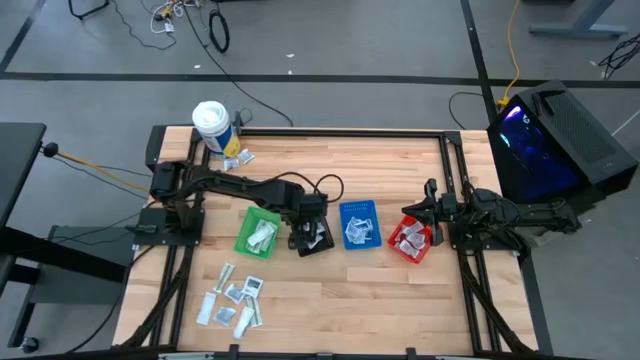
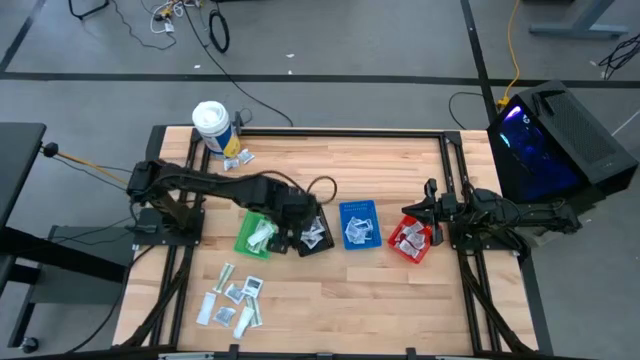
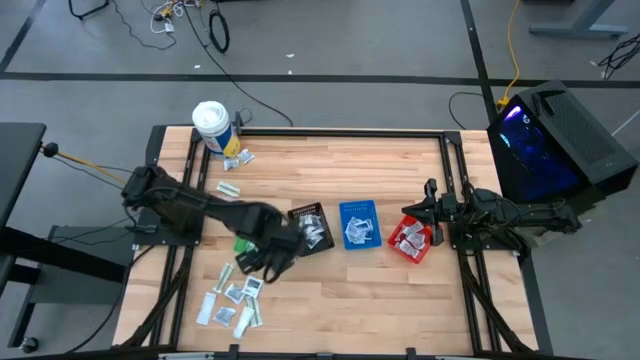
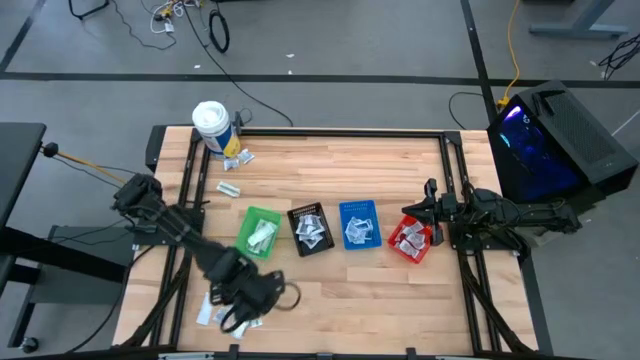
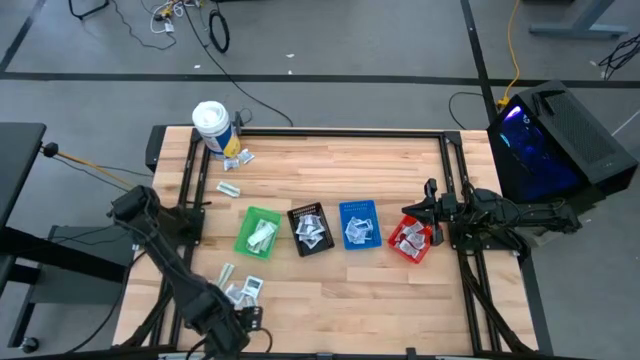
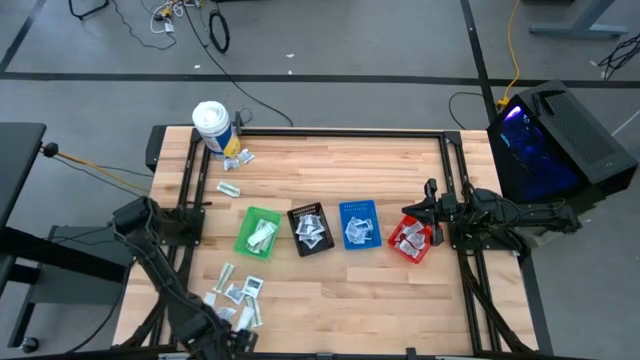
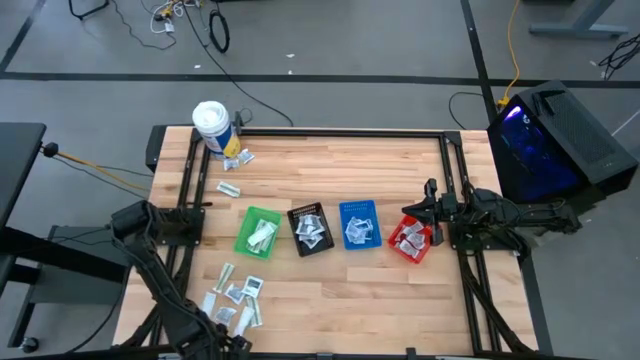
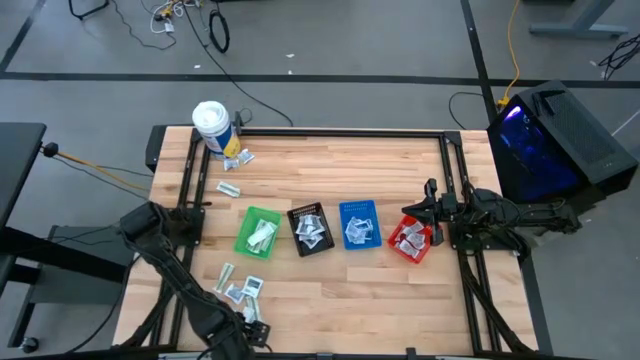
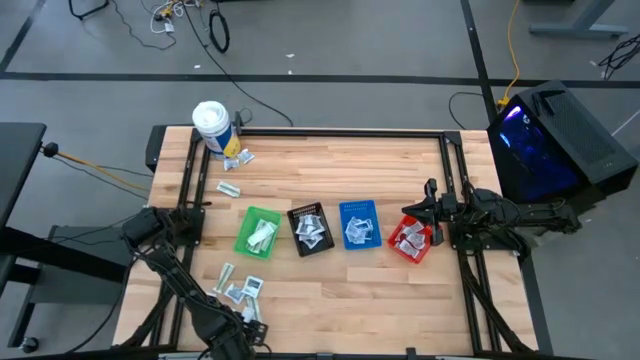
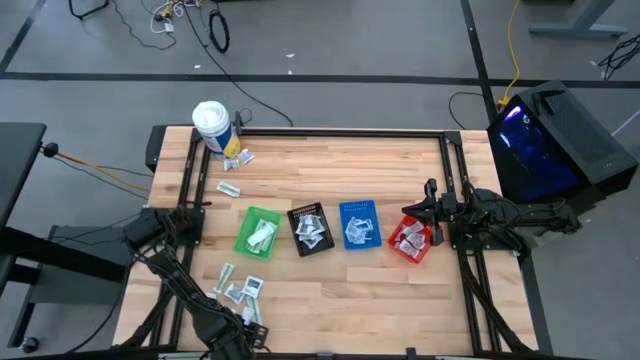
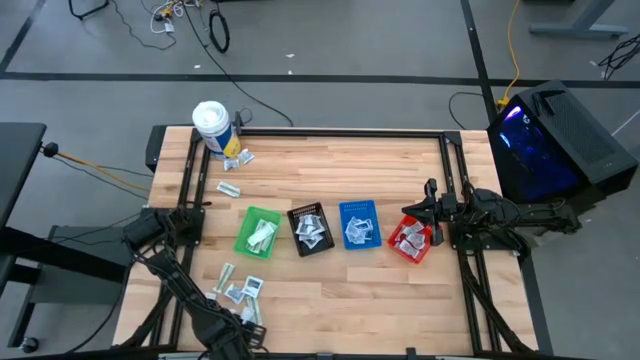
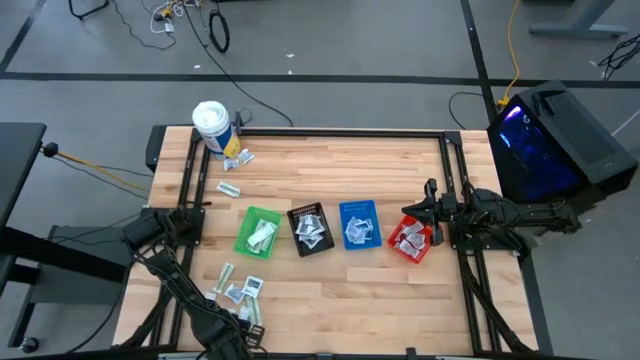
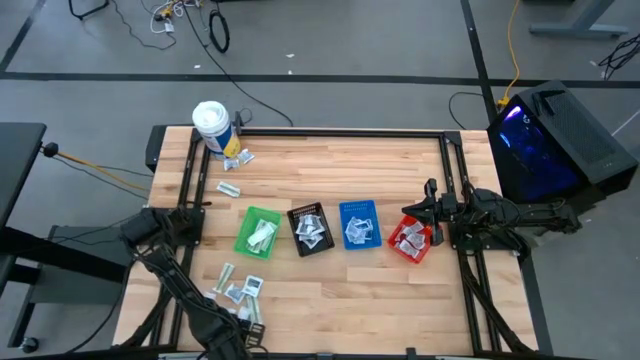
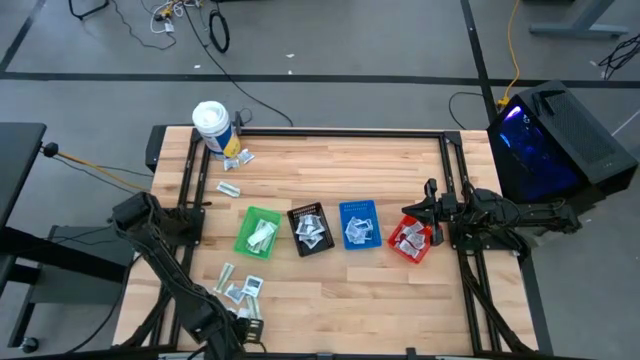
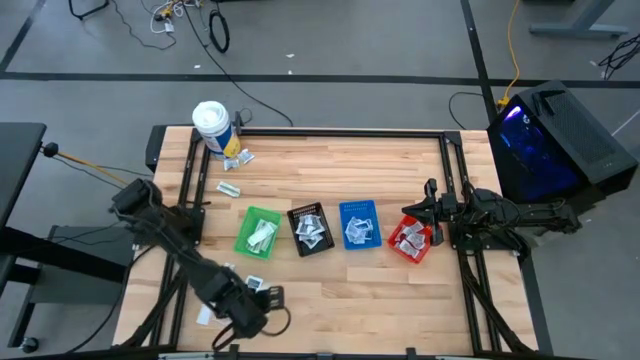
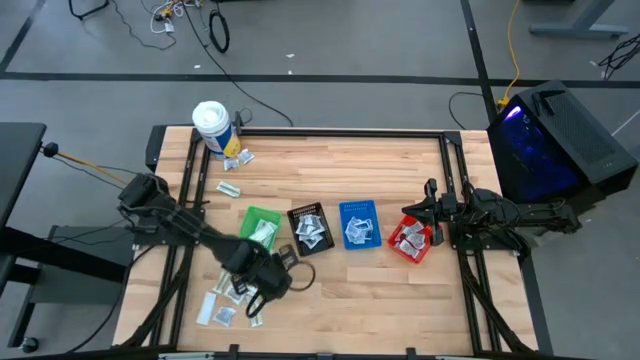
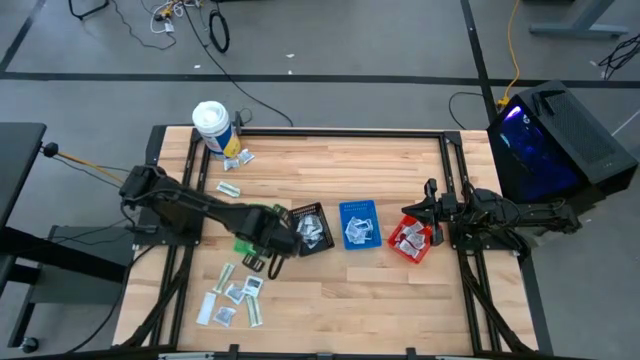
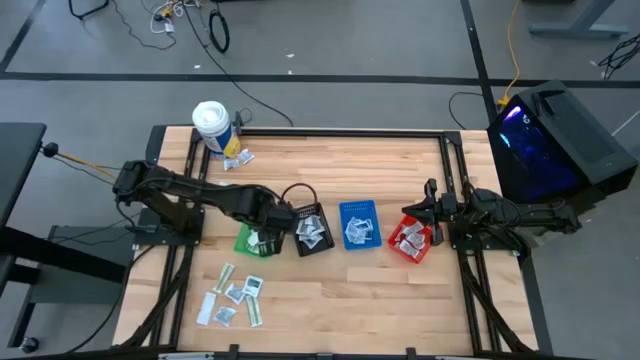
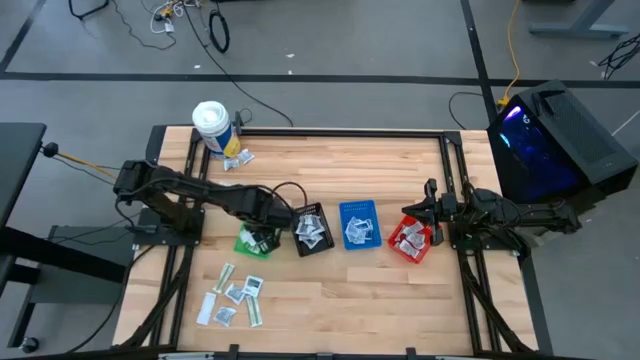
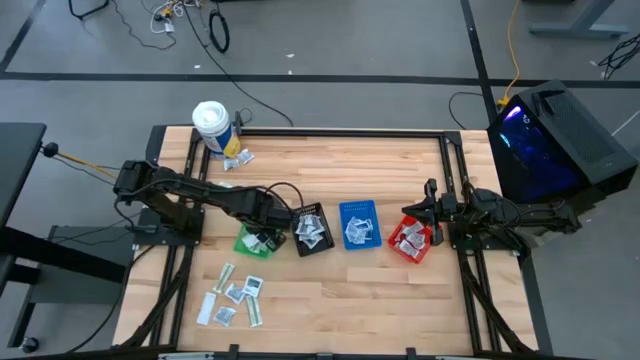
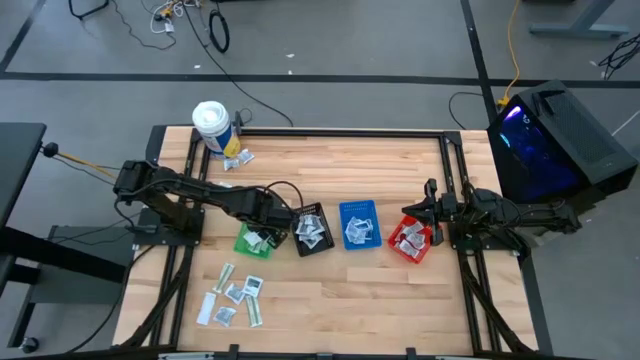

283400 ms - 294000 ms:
Task: Pick & Place First Aid Supplies
Put the bandage into the green basket

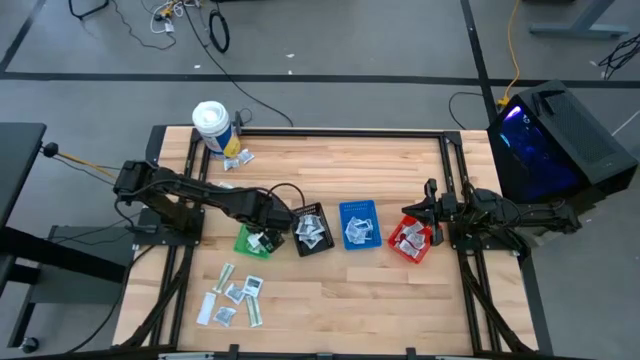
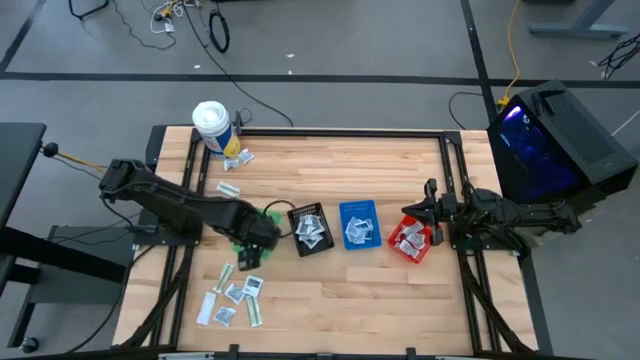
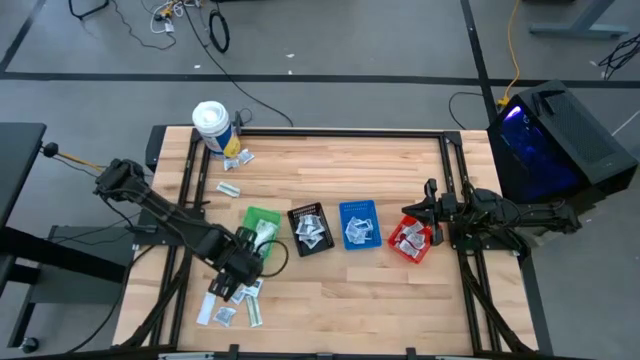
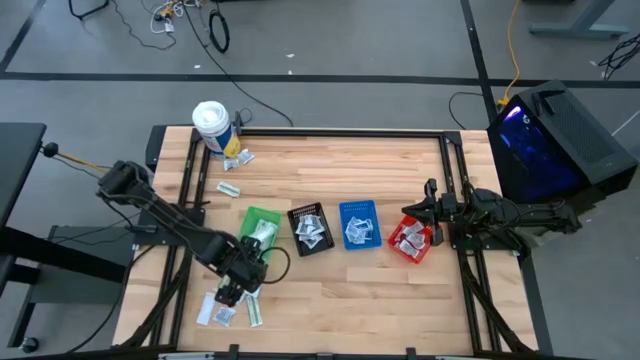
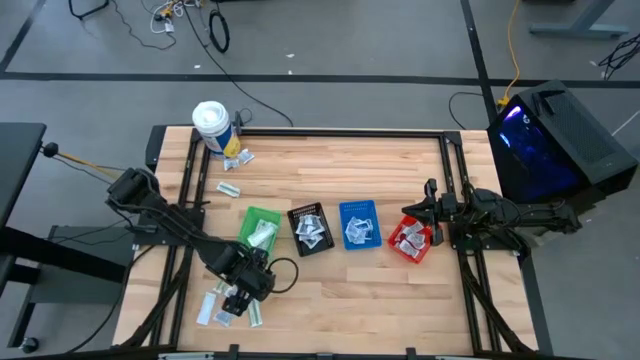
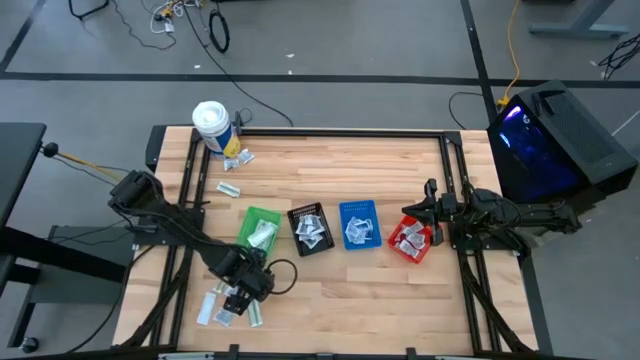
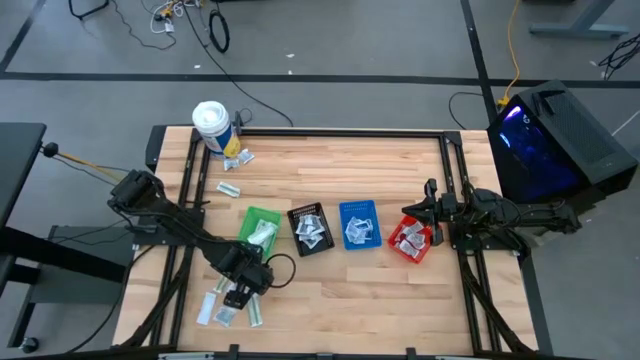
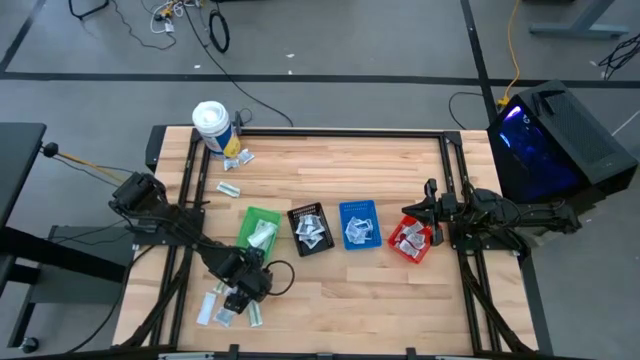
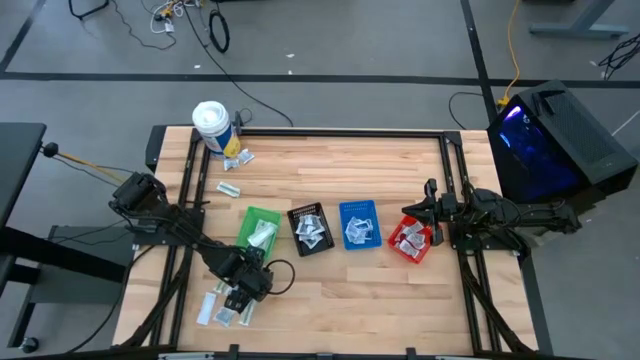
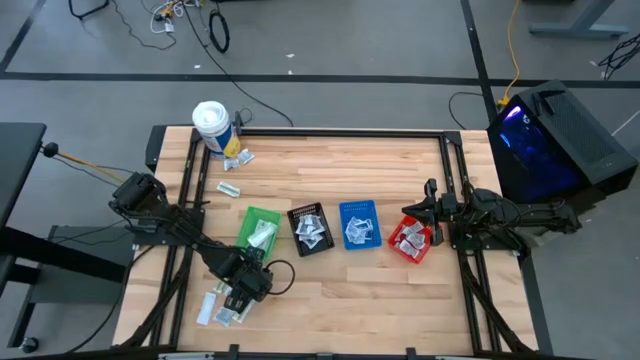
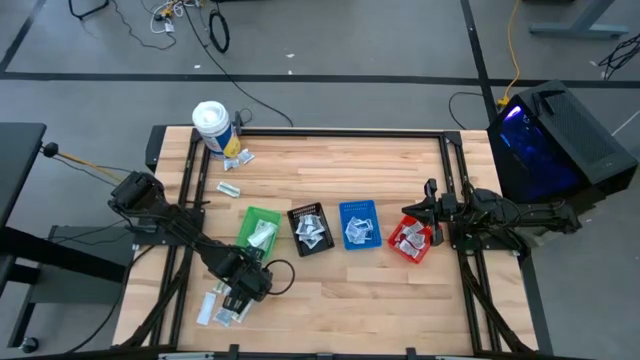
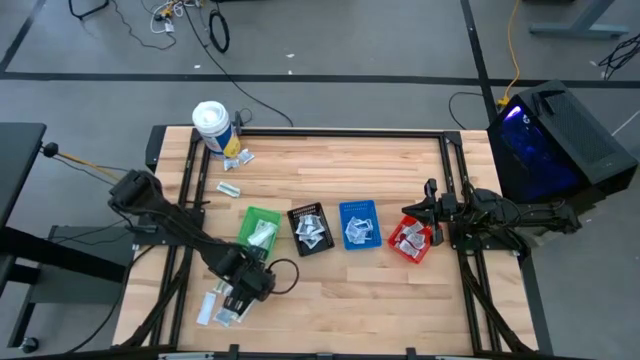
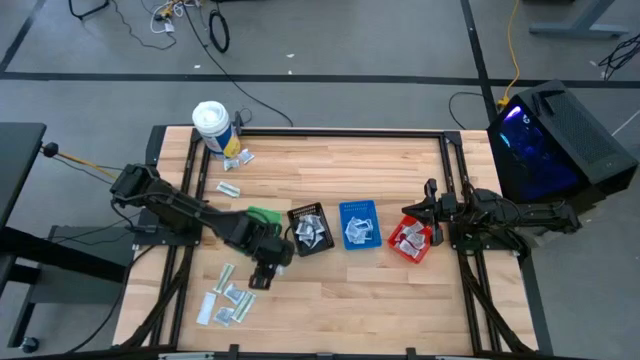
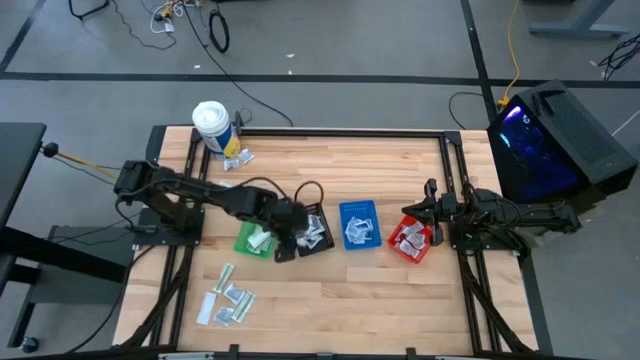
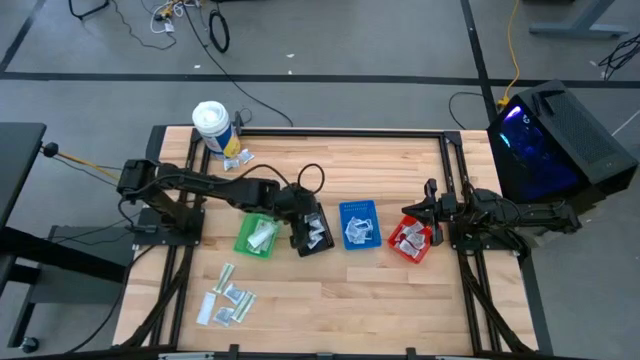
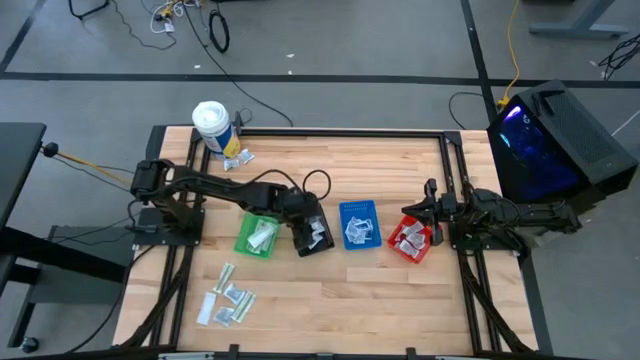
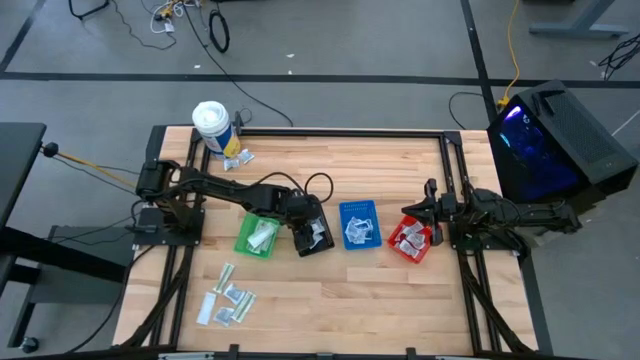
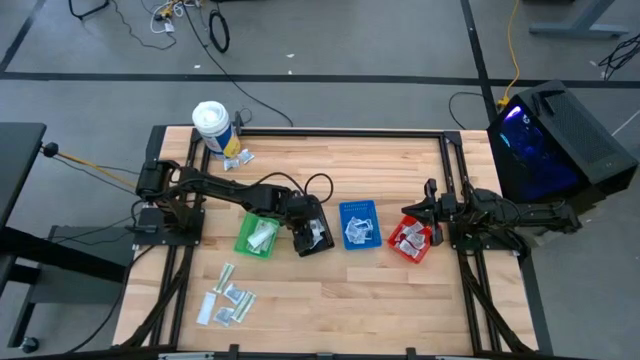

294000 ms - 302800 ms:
Put the towelette pack into the black basket
